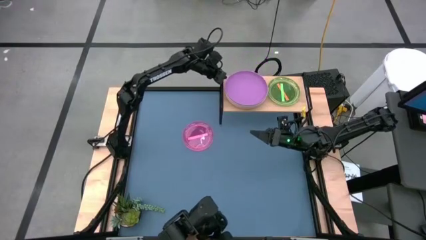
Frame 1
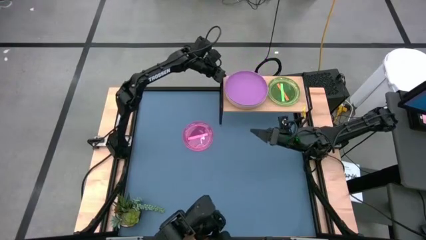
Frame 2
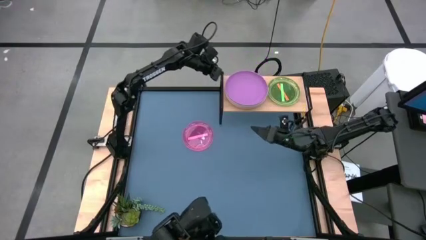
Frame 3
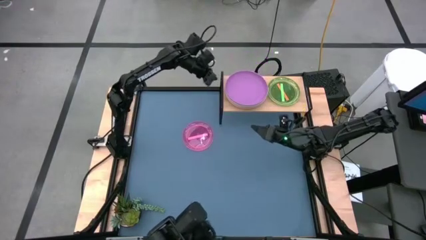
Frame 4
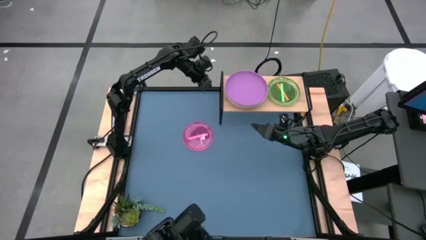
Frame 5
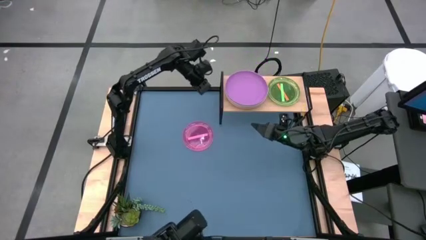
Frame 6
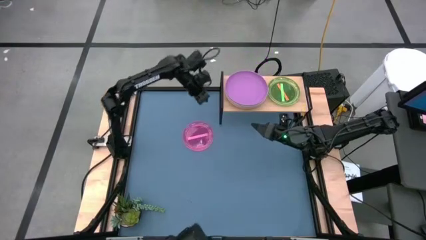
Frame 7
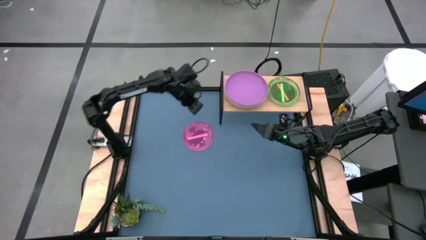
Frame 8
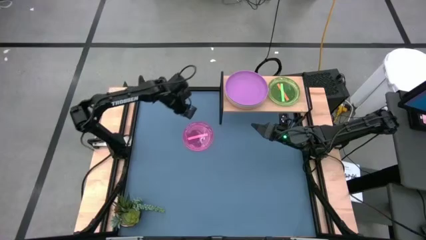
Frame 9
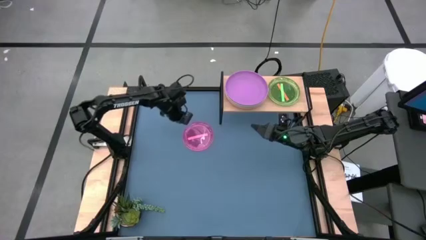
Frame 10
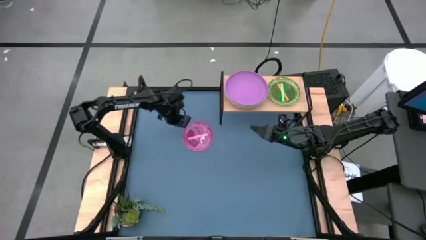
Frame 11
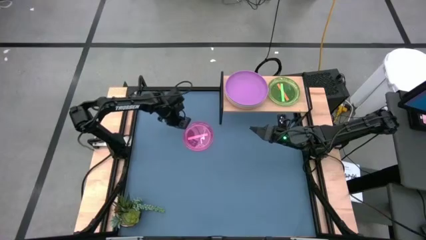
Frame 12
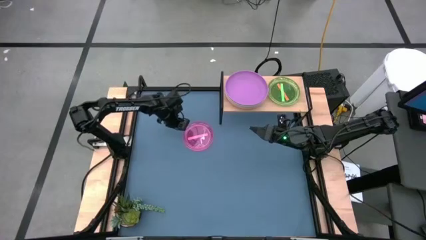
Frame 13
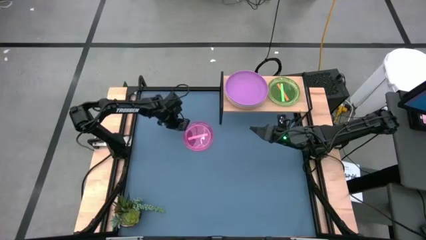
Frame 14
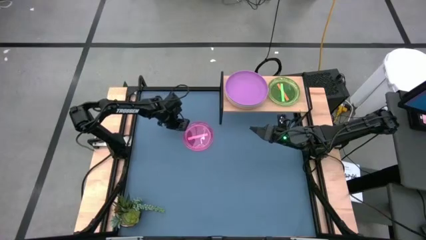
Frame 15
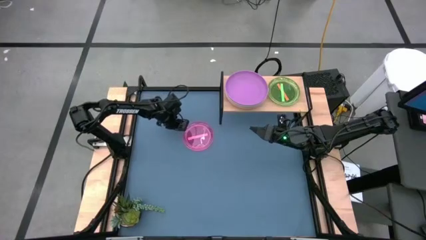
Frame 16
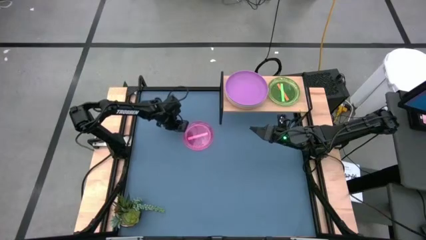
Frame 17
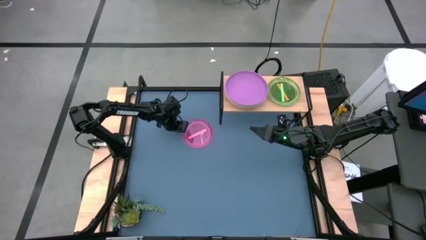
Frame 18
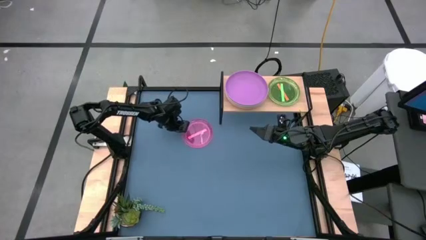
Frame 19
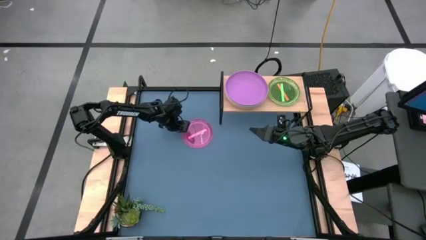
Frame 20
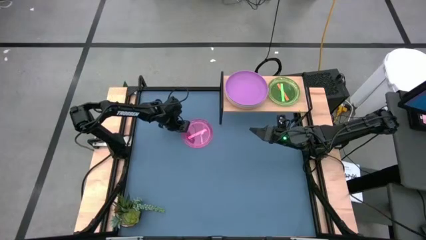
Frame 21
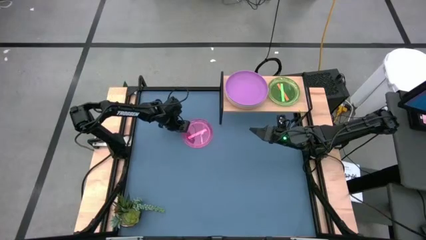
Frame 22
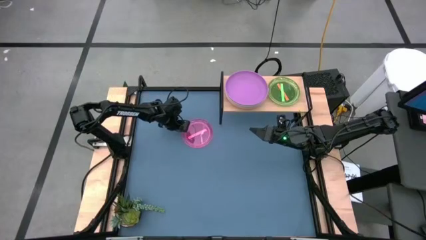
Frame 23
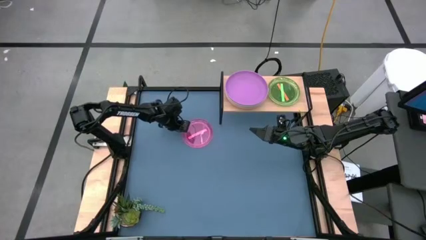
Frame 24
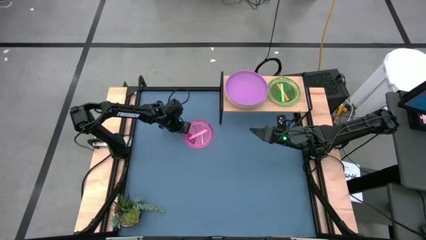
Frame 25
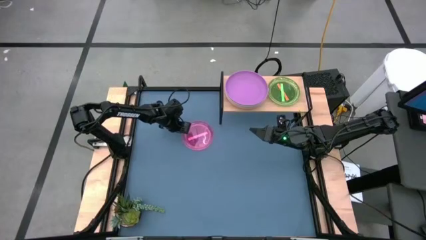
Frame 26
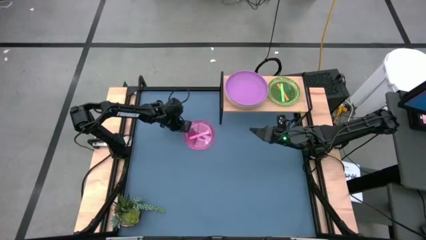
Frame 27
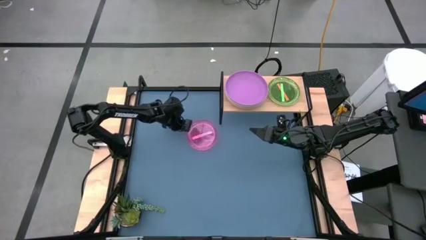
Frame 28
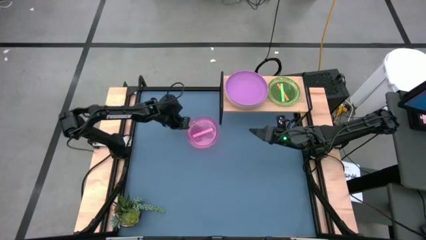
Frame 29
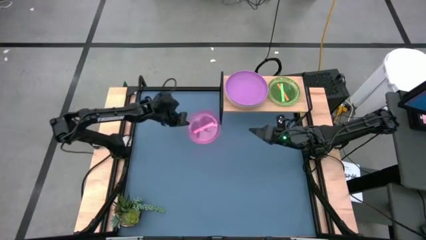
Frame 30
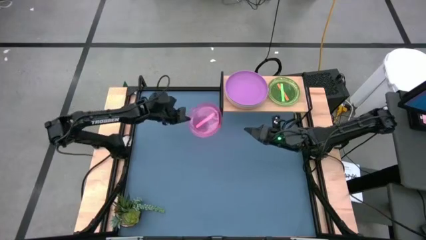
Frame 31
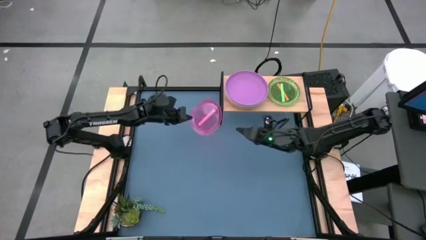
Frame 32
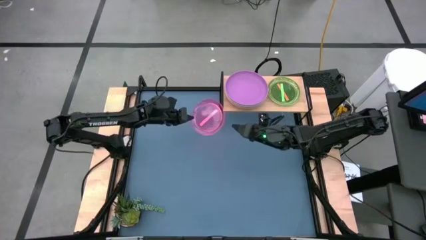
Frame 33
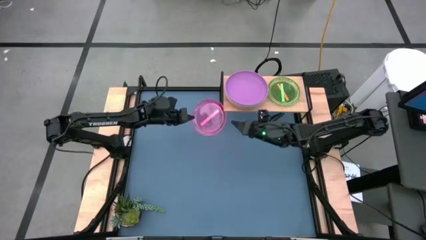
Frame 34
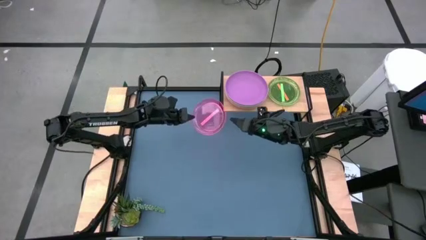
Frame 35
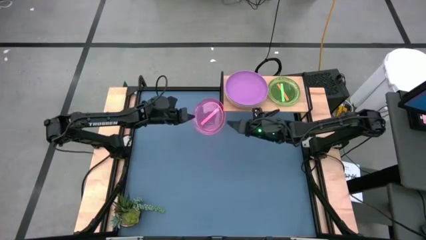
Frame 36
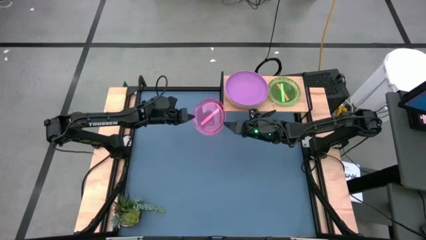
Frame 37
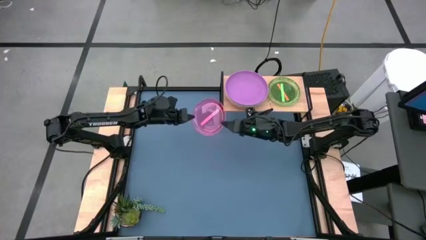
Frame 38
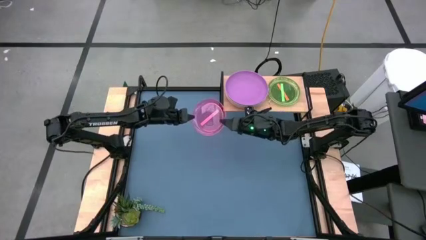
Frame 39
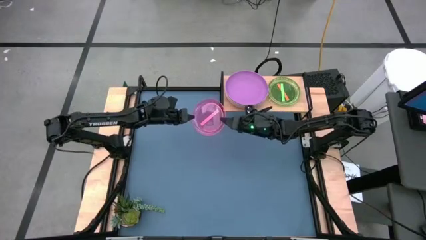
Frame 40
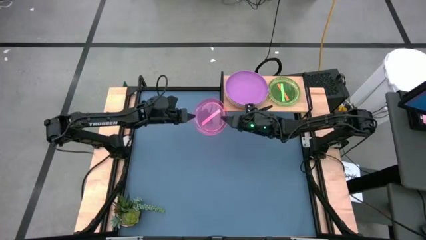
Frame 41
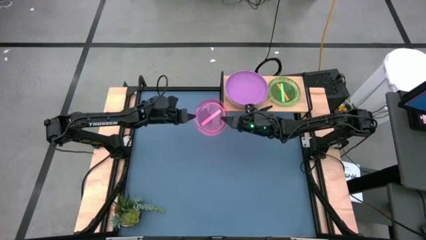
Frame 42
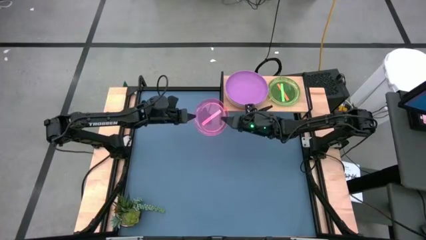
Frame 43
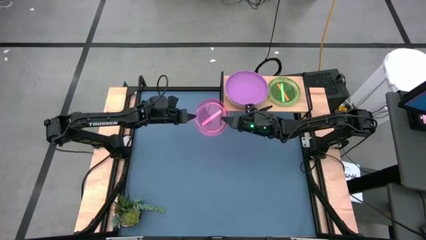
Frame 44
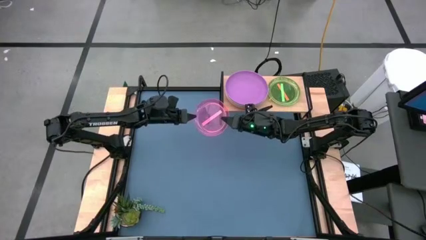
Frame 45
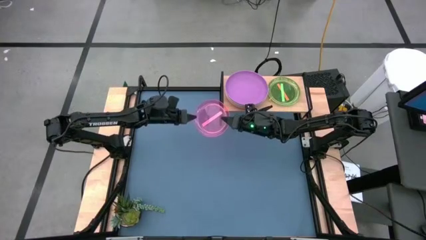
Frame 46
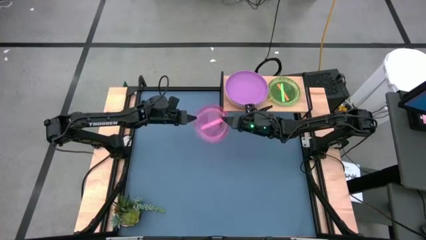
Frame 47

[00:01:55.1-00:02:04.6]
Task: Place and stack plates onto a shelf
Stack the small pink plate on the small green plate on the shelf

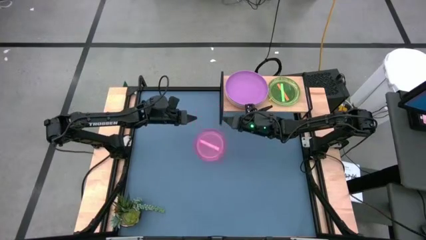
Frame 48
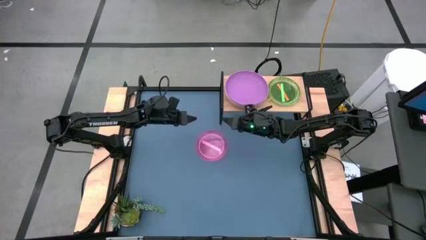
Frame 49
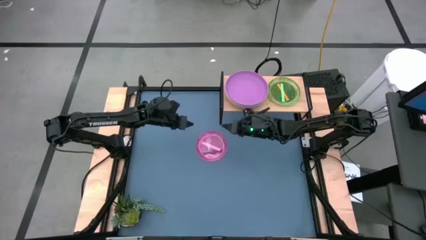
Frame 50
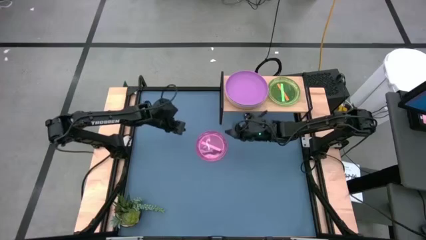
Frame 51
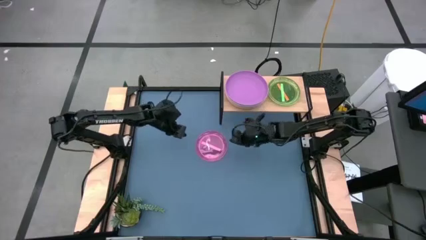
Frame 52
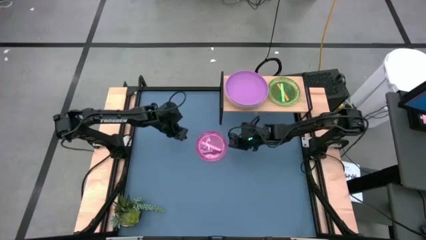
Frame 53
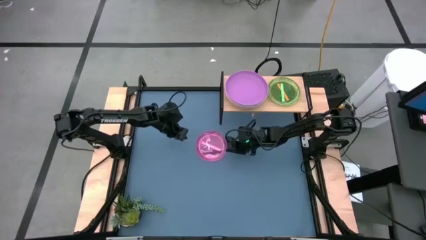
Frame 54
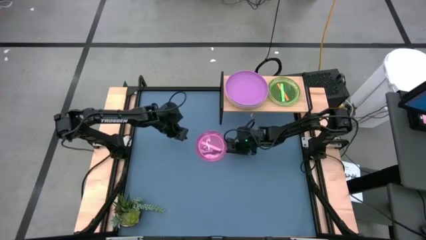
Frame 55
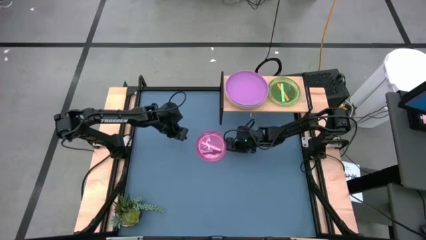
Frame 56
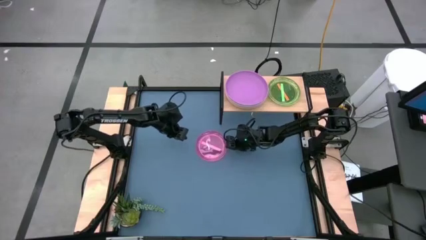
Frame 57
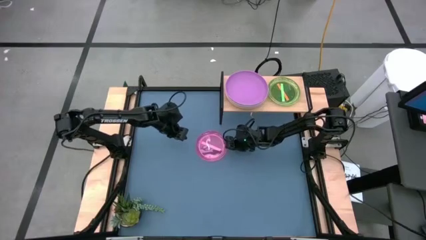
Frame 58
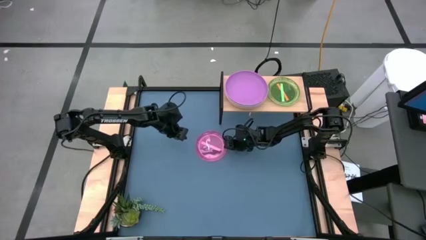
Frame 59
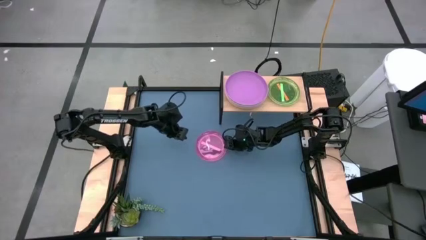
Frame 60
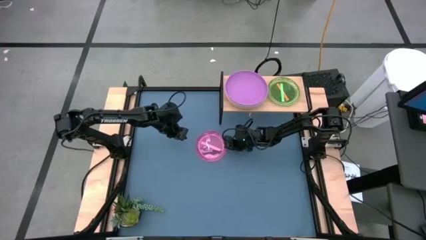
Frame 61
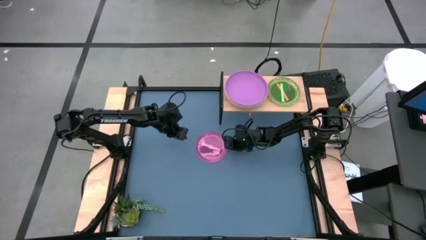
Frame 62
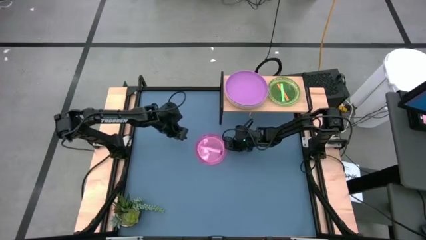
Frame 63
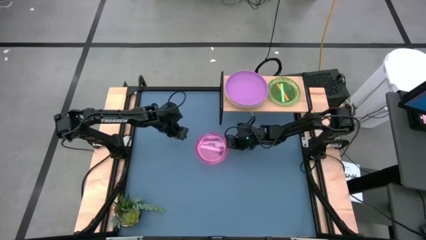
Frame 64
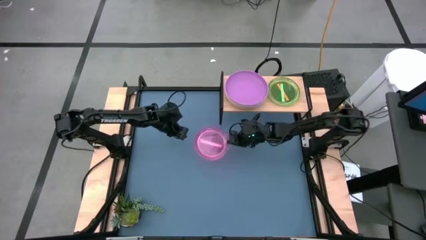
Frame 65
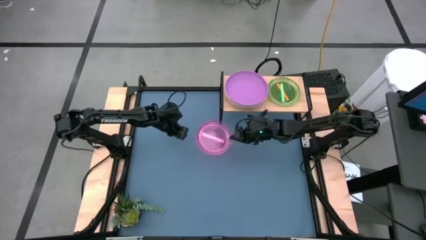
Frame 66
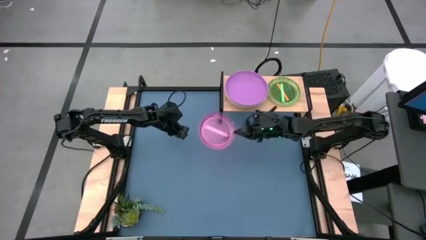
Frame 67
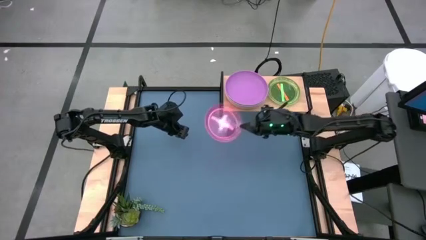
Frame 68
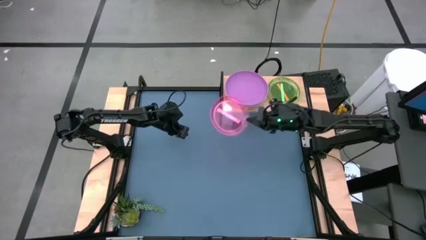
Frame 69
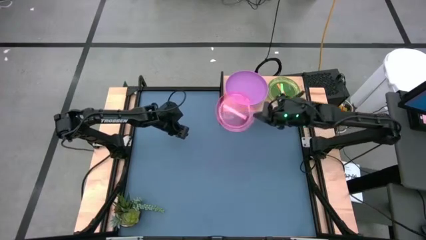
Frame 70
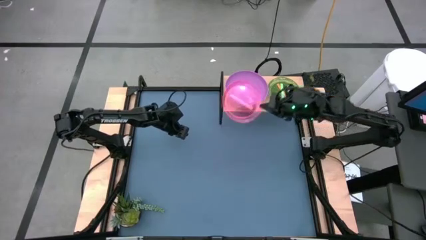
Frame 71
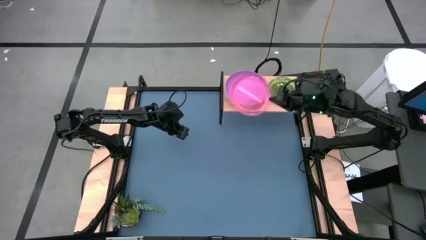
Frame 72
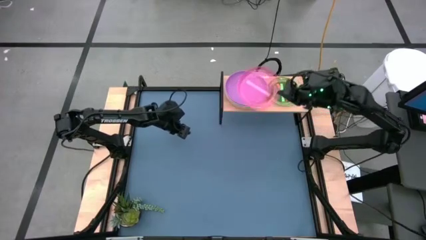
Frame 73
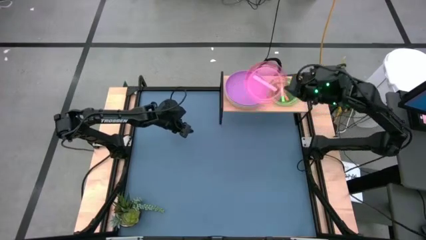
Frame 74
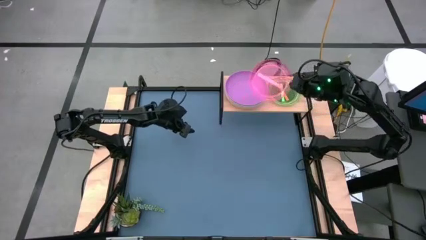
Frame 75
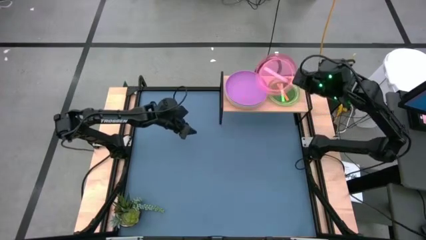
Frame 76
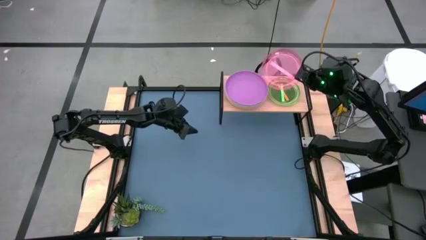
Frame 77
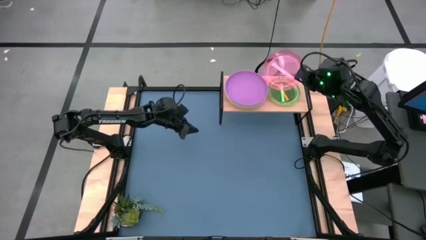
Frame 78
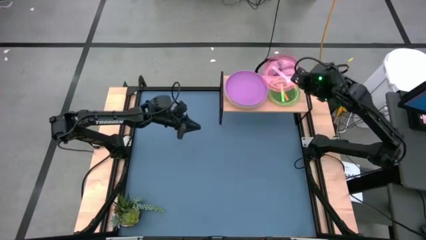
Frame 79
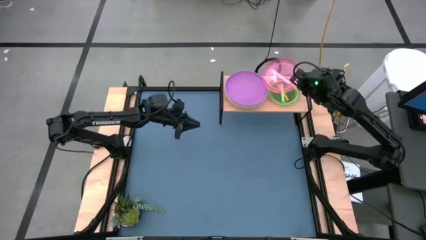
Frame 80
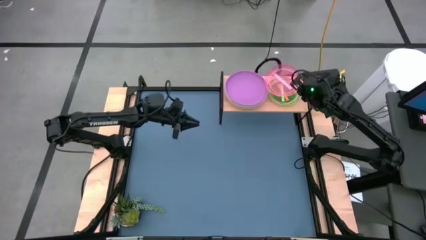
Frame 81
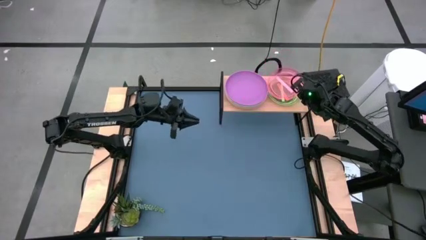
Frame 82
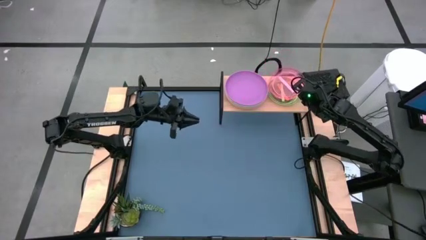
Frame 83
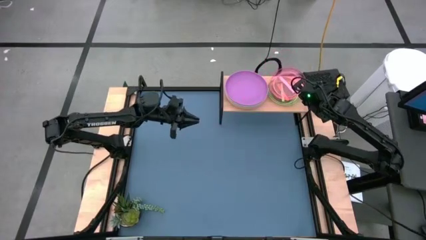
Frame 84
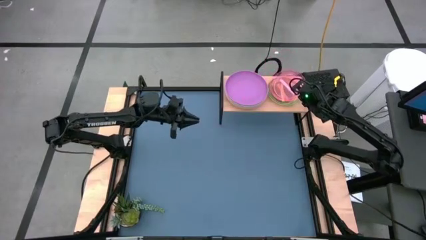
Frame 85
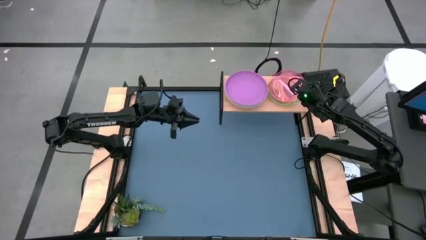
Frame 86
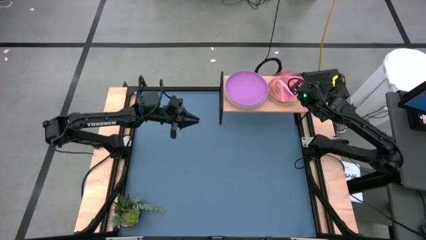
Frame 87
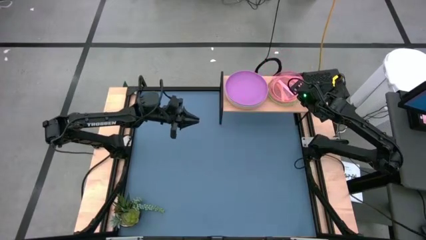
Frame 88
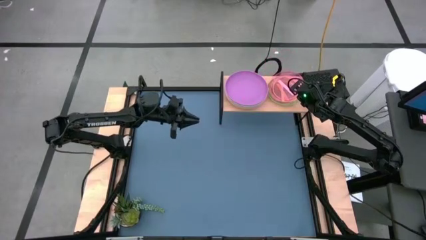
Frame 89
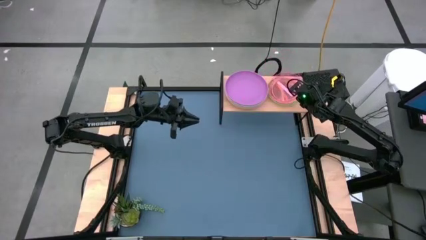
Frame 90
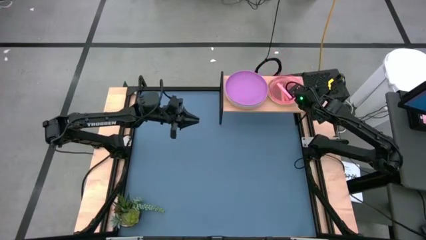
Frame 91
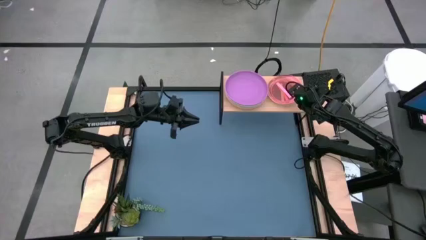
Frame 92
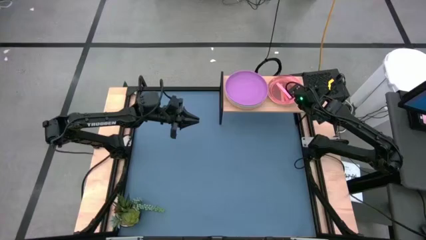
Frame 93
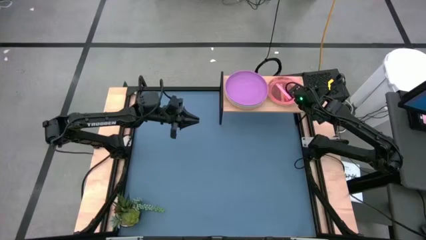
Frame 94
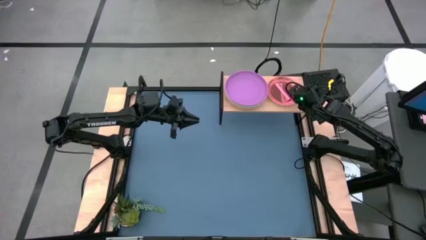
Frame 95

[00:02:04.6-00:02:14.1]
Stack the small pink plate on the small green plate on the shelf
